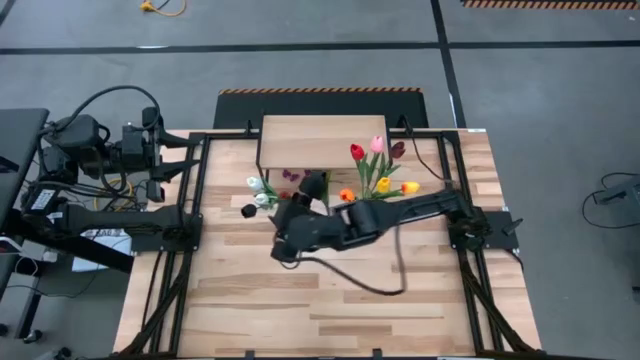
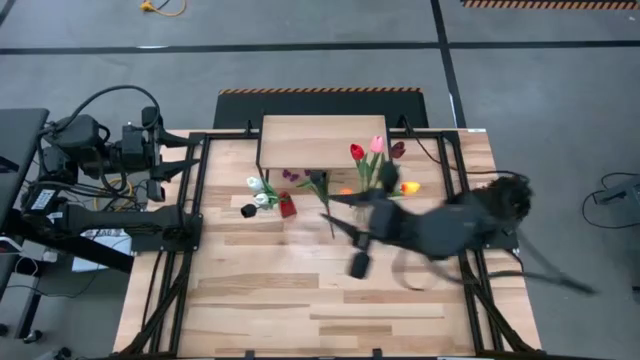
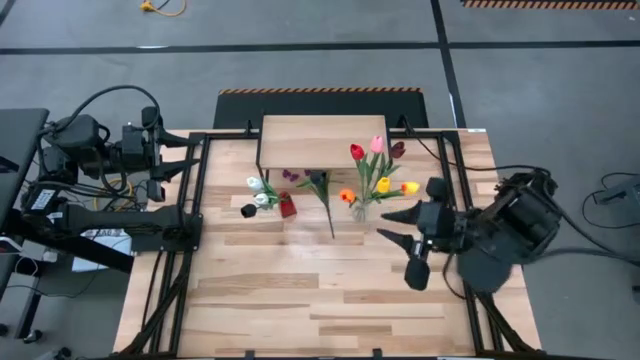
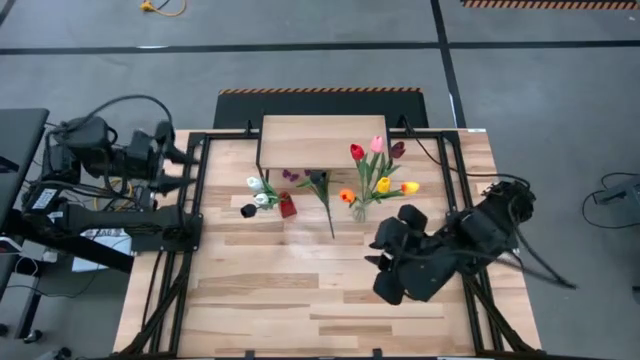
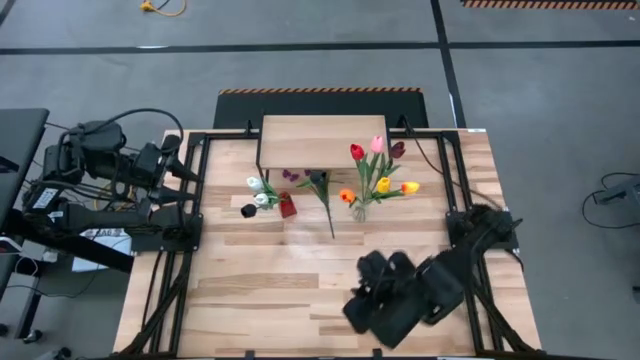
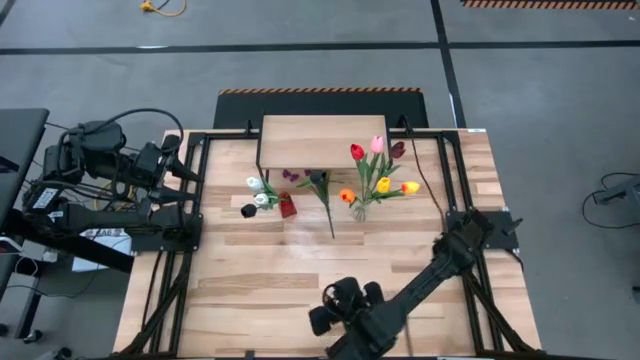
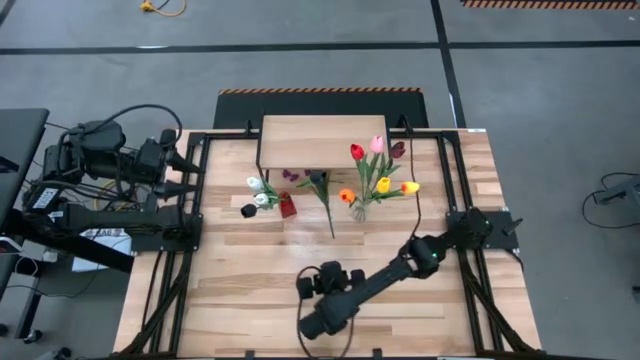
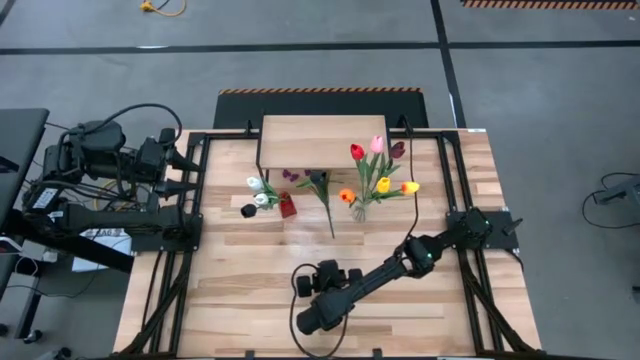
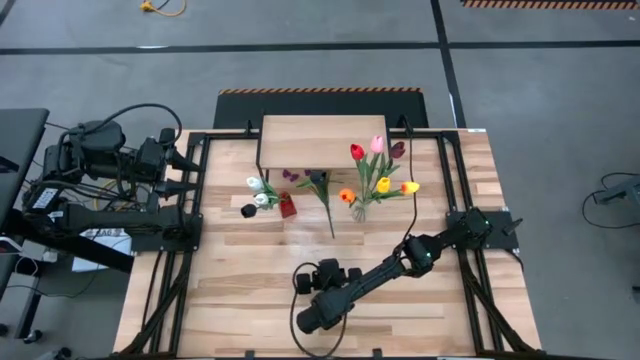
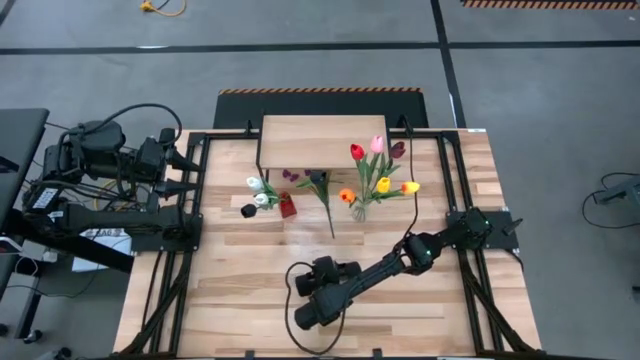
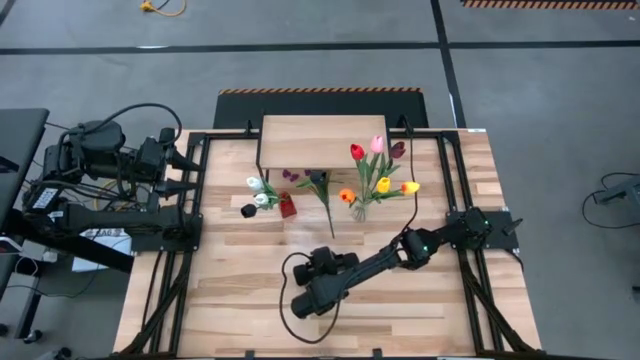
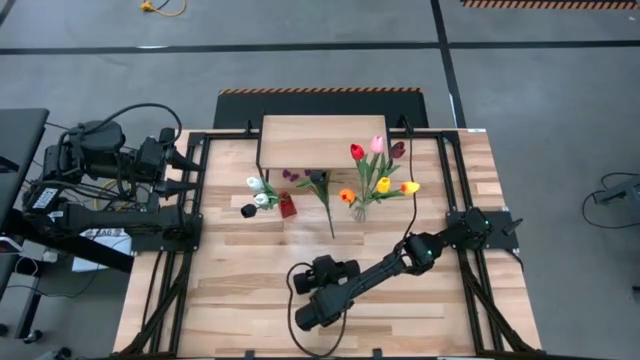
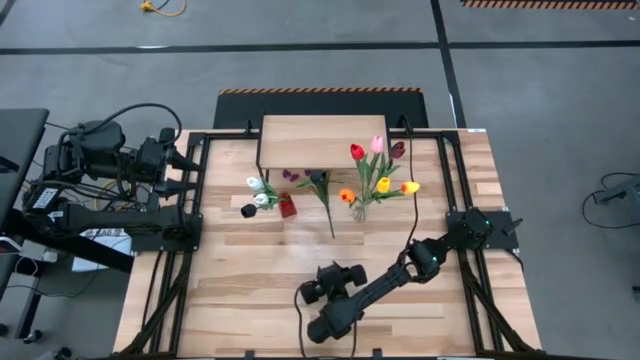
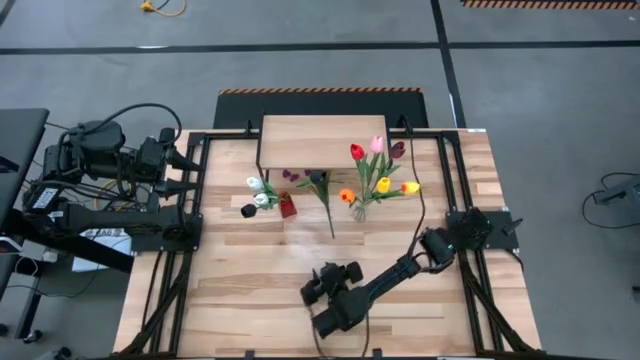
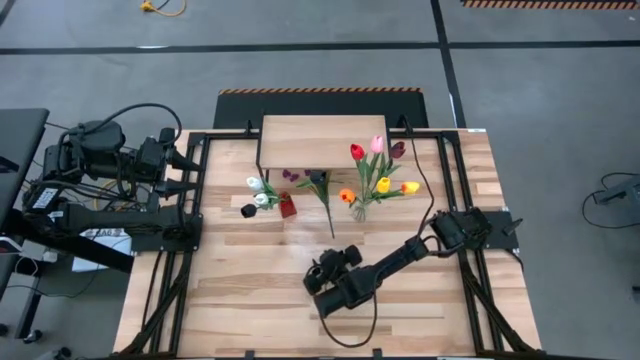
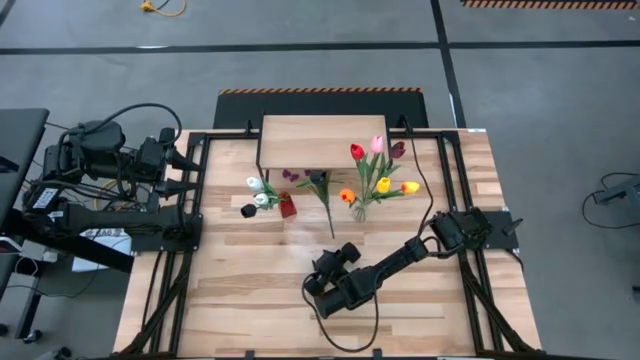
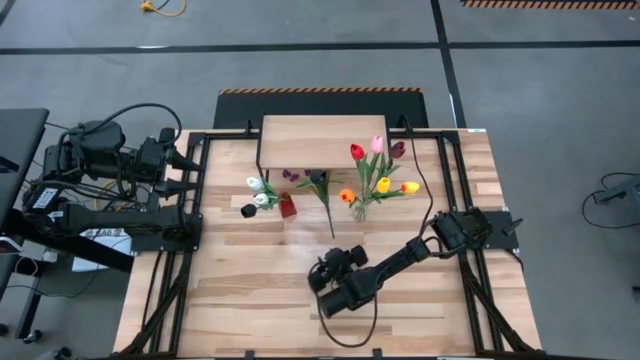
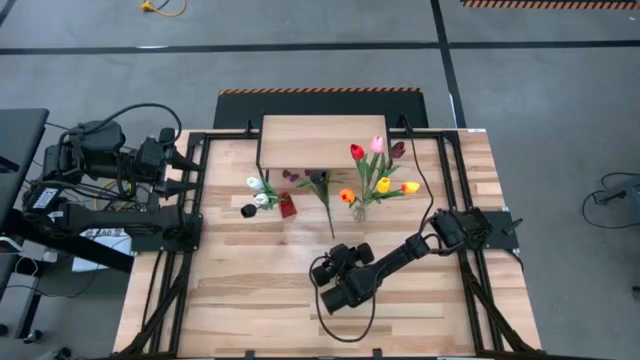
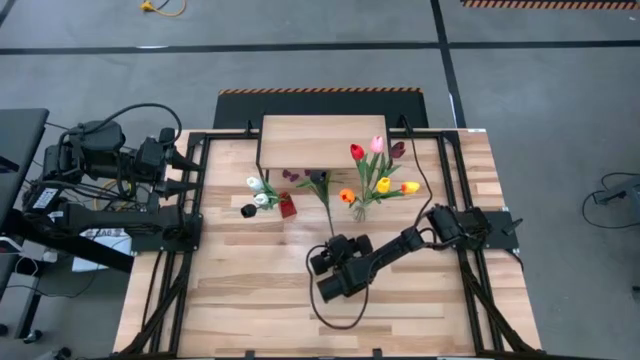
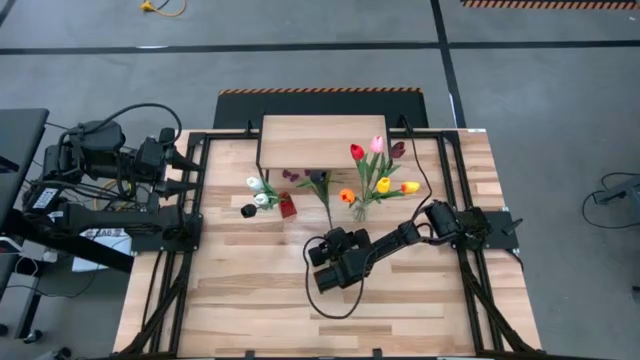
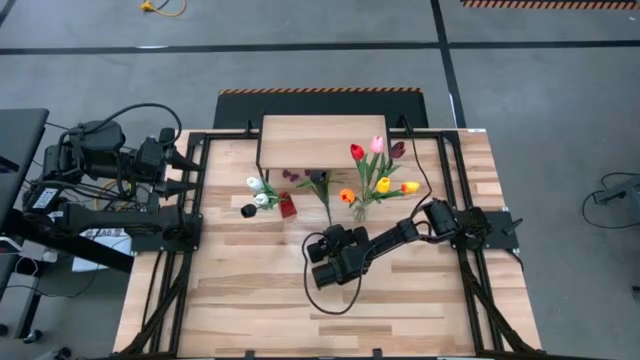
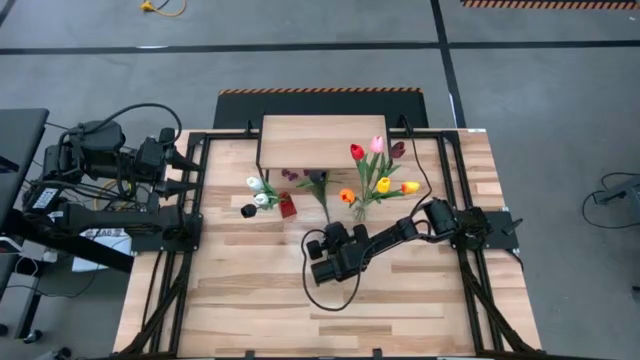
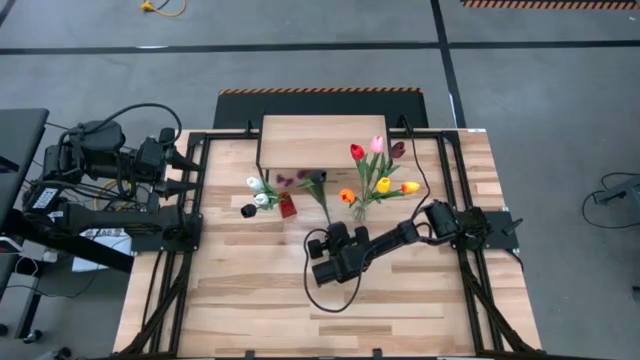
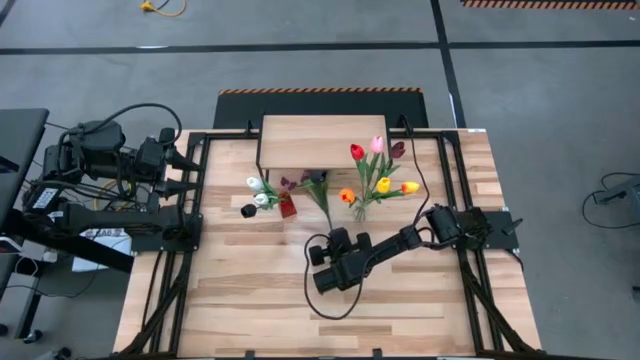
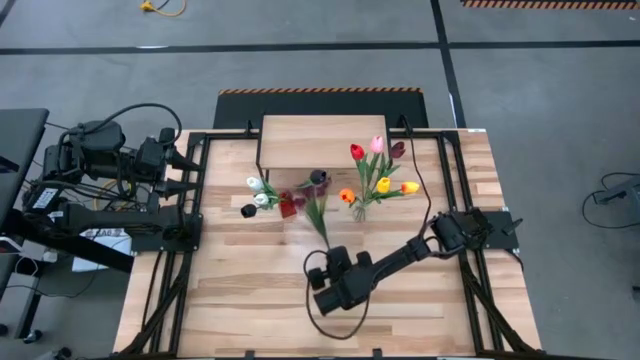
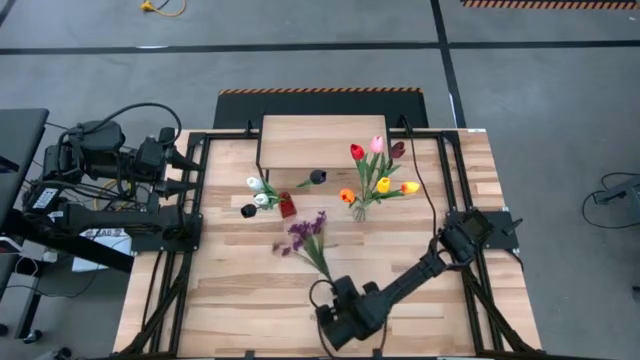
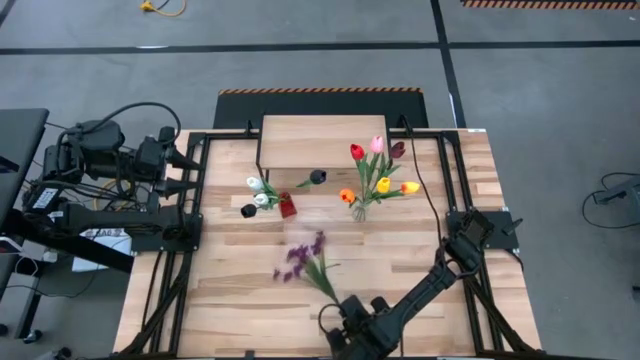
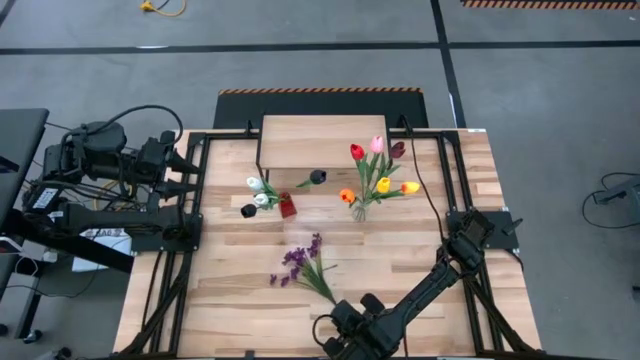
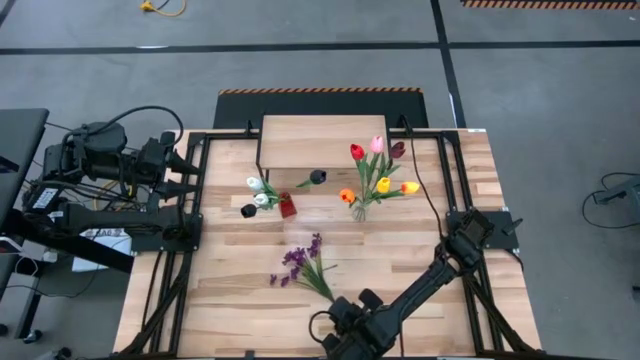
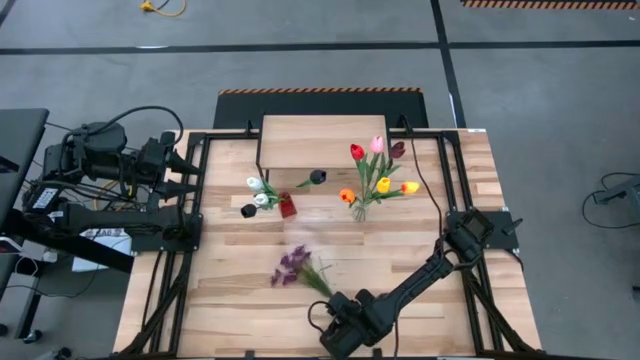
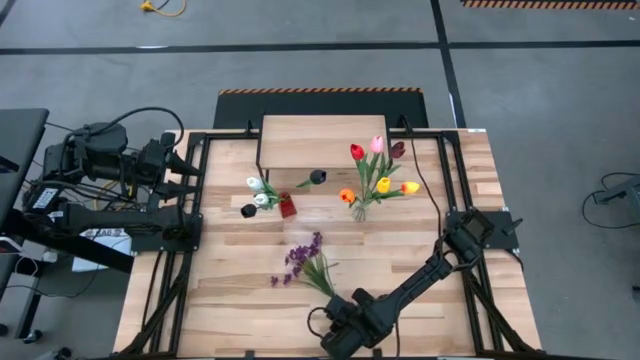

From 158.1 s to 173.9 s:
Task: Pick and place flowers into a vace then onto a shelf
Put the purple flowers into the red vase

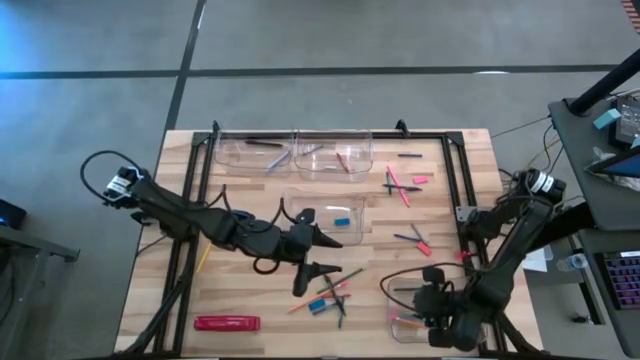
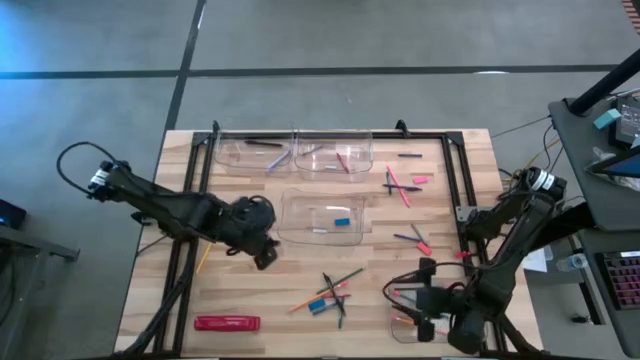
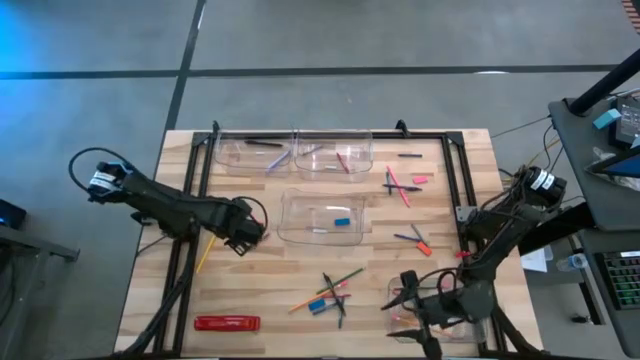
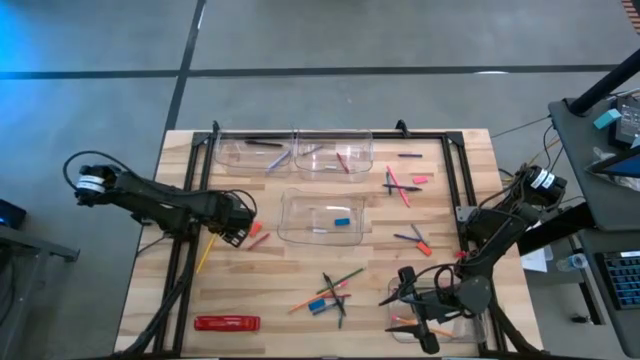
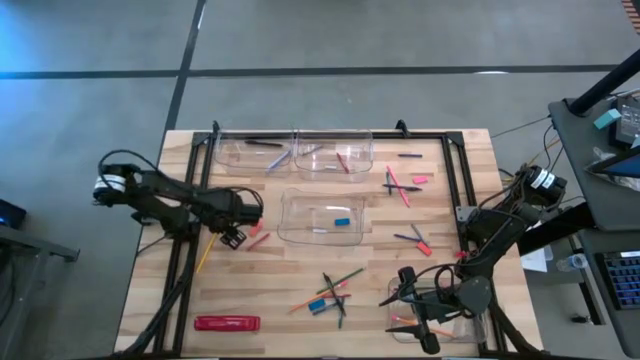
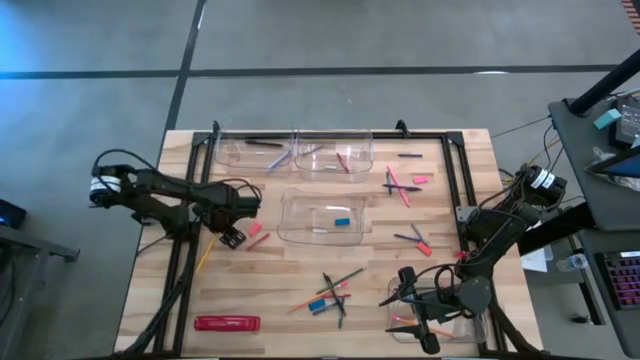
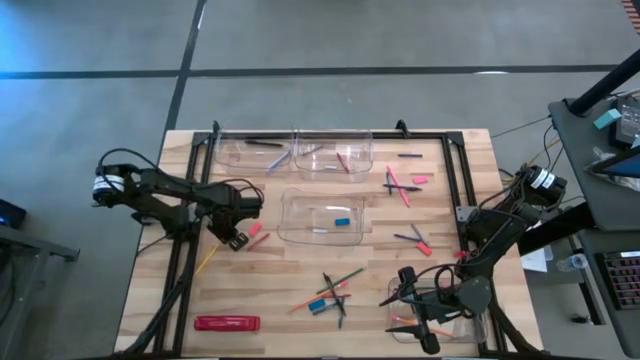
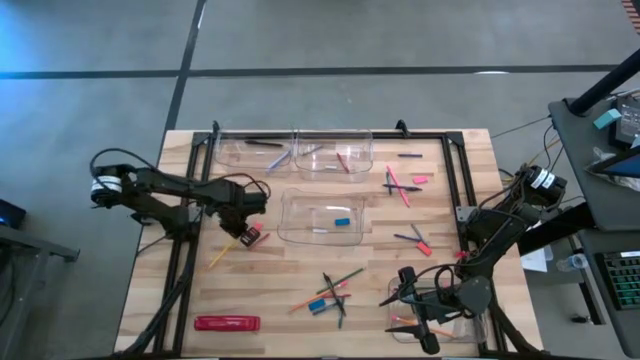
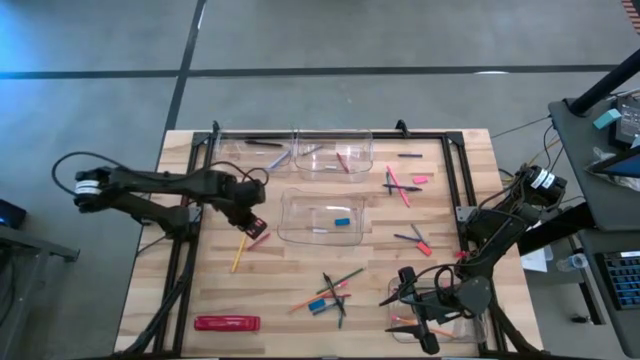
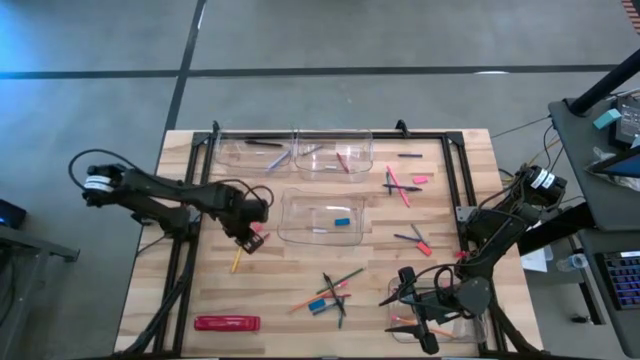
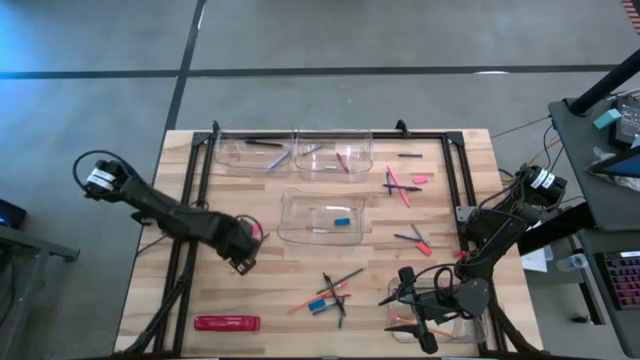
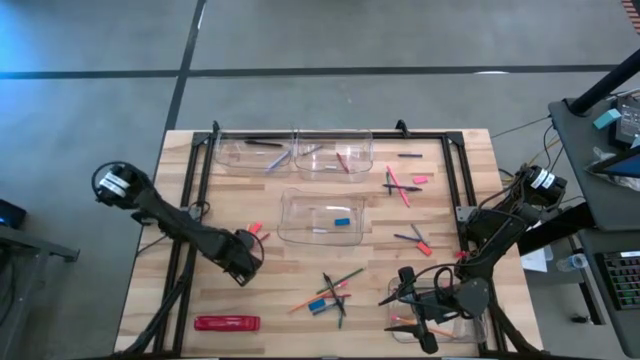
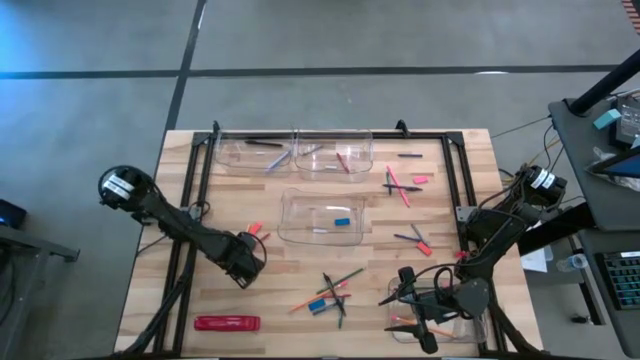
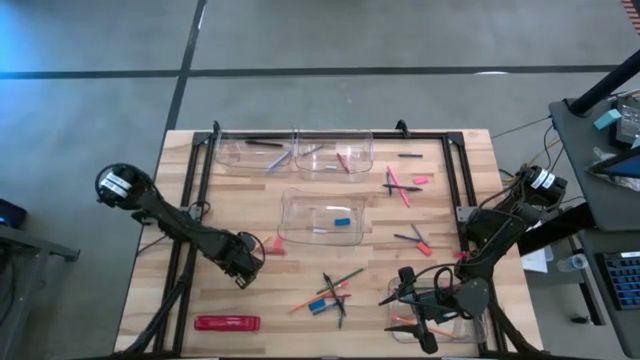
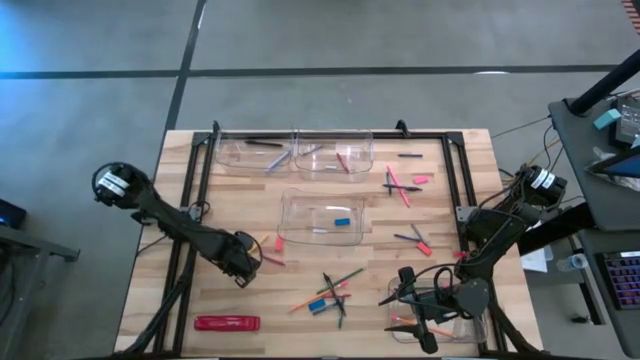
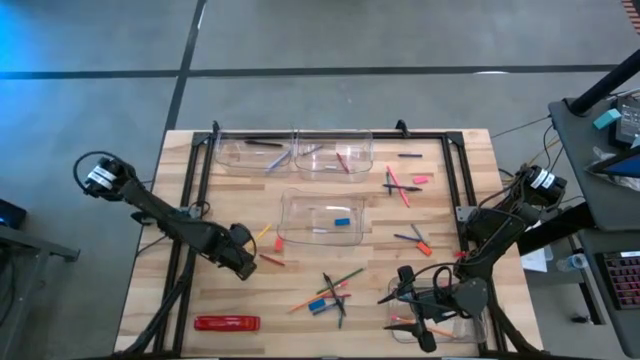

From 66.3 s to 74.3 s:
Task: Sort crayons/erasers/pens/pencils in bins
Put the yellow pencil into the bottom transparent bin
